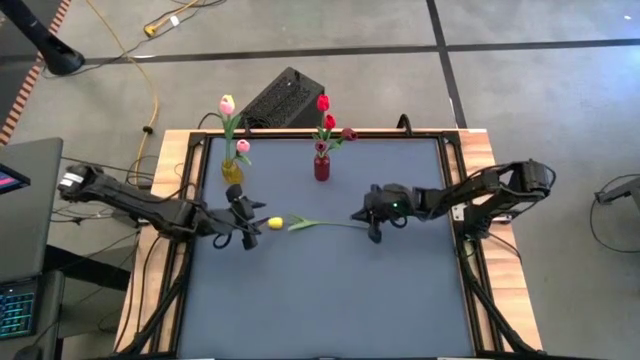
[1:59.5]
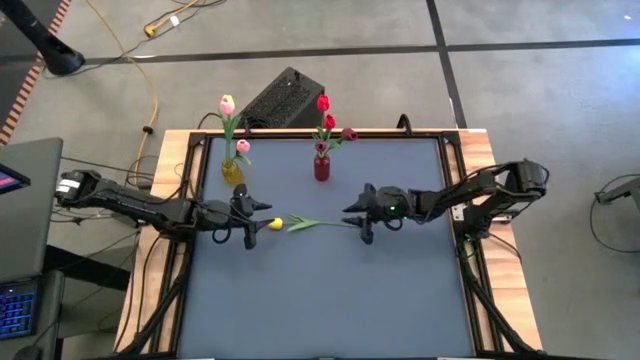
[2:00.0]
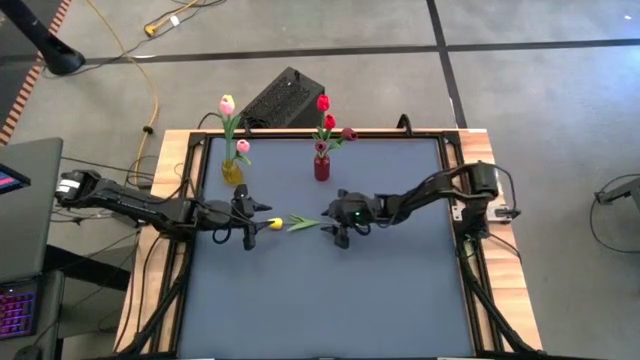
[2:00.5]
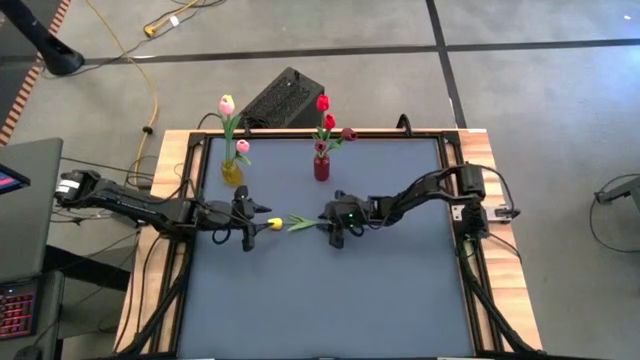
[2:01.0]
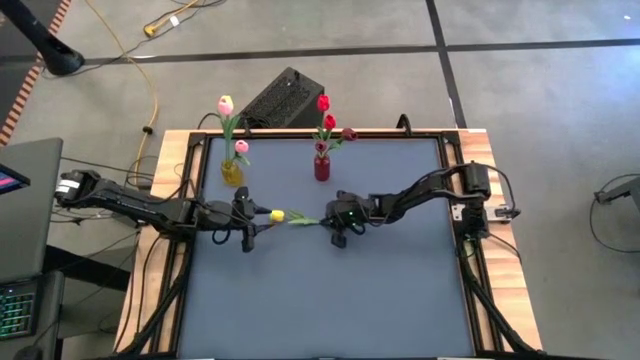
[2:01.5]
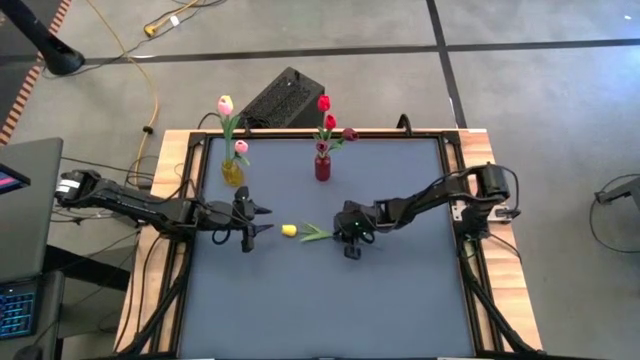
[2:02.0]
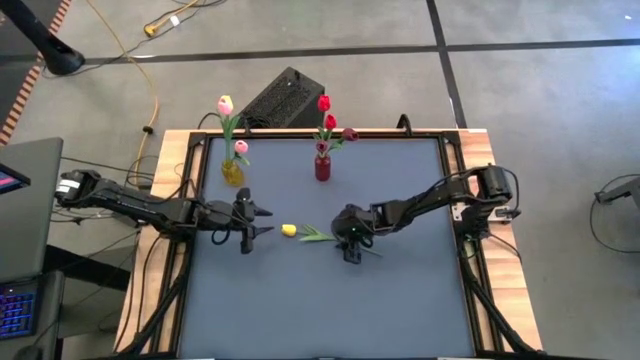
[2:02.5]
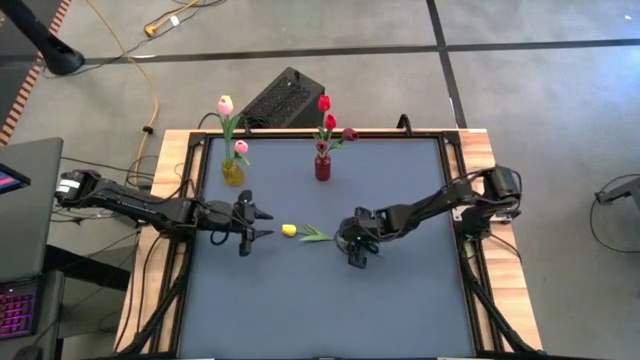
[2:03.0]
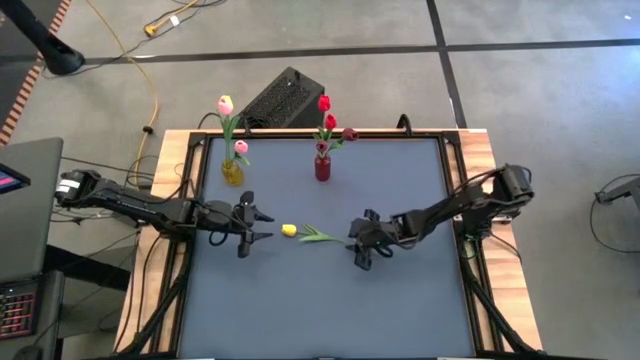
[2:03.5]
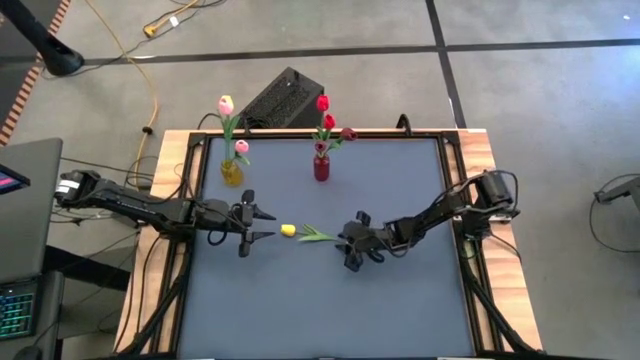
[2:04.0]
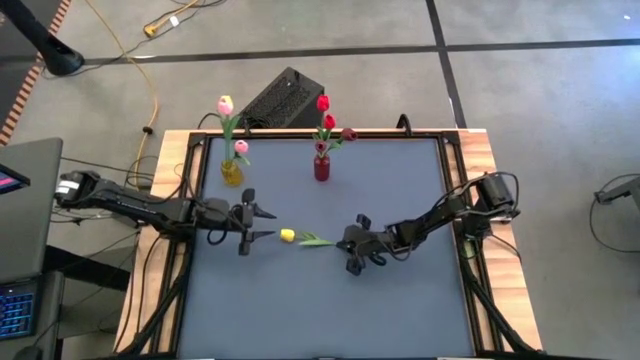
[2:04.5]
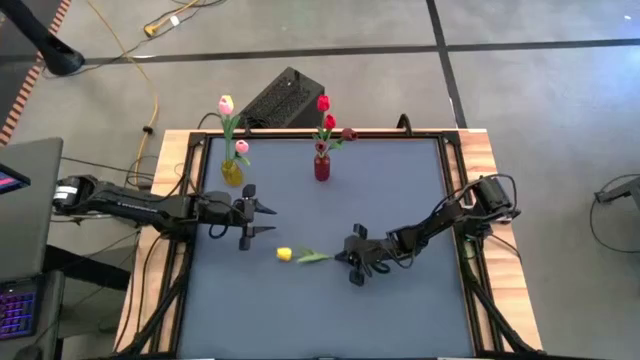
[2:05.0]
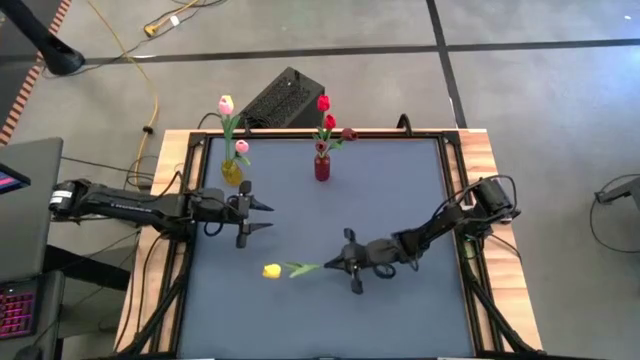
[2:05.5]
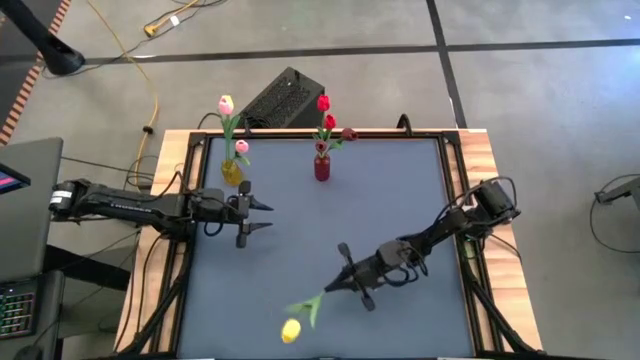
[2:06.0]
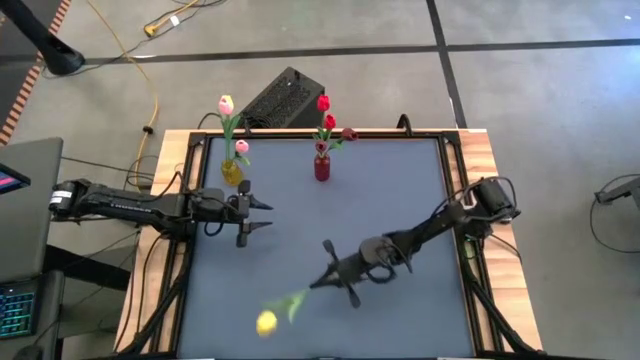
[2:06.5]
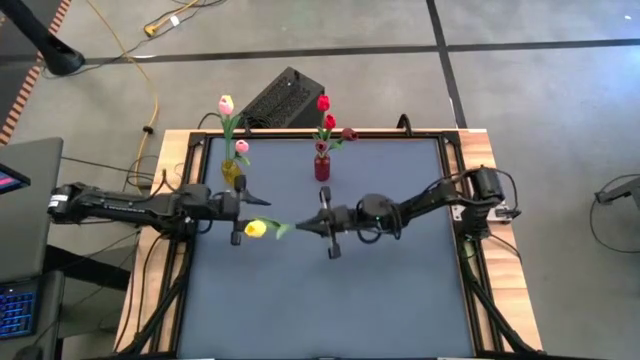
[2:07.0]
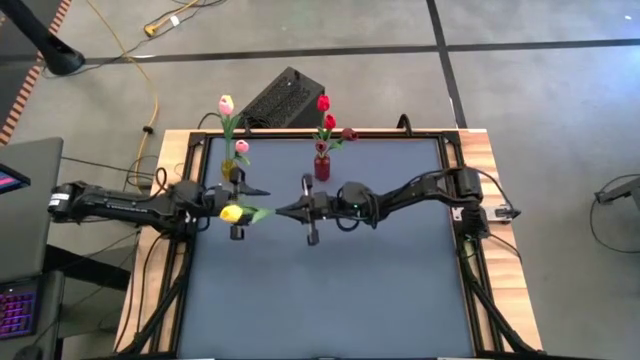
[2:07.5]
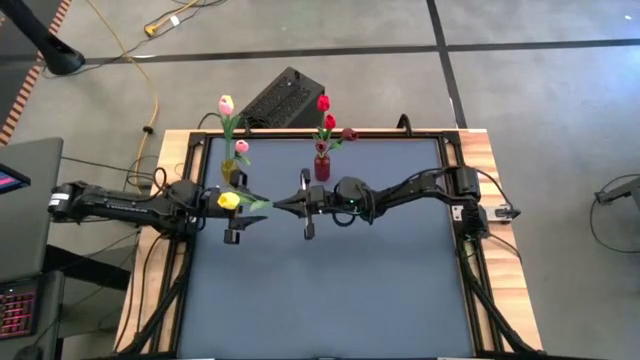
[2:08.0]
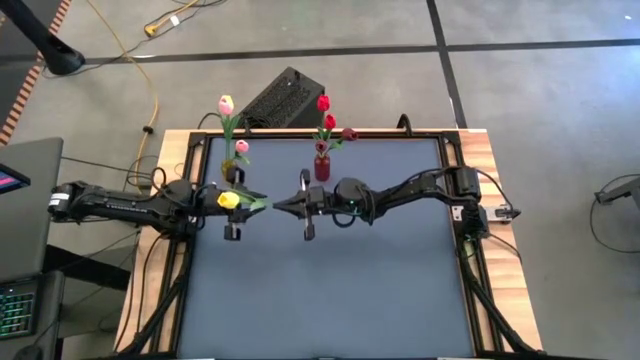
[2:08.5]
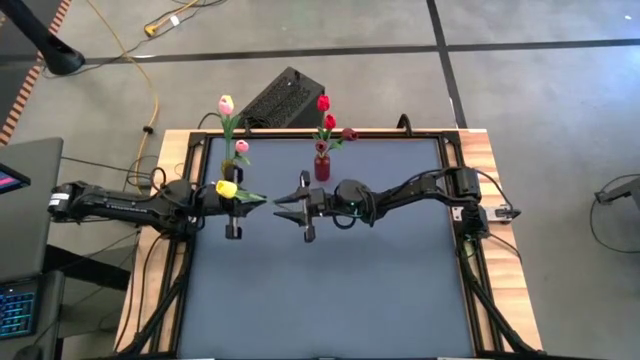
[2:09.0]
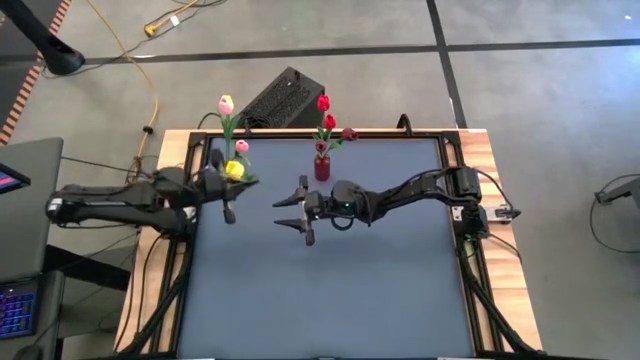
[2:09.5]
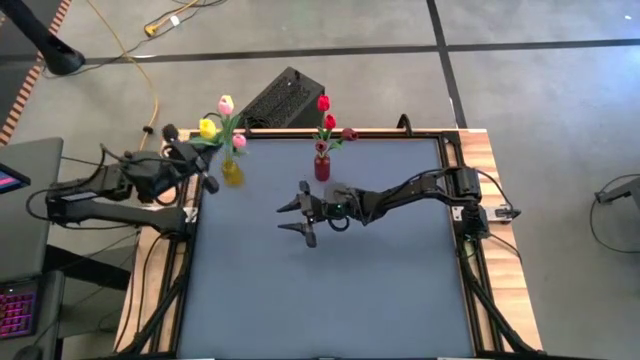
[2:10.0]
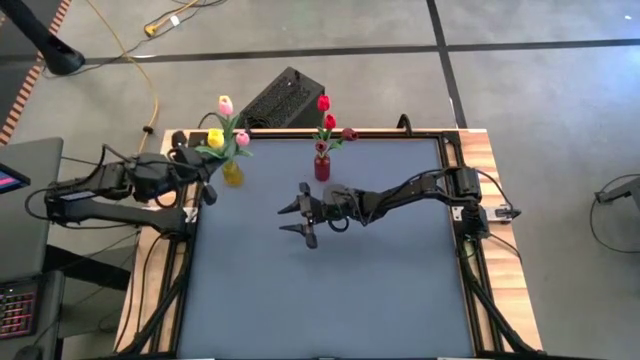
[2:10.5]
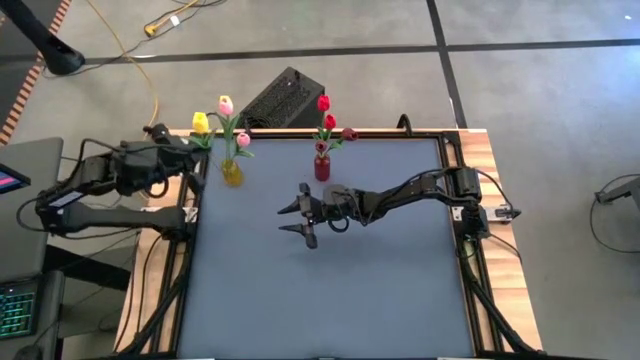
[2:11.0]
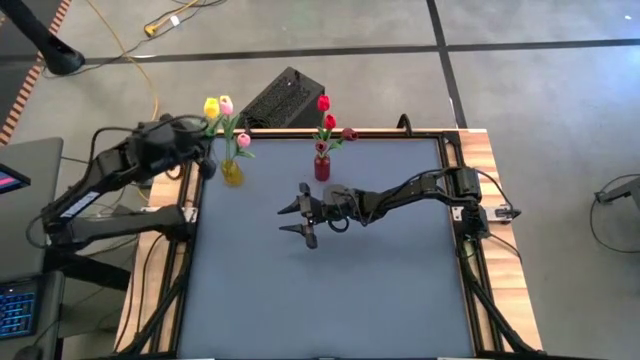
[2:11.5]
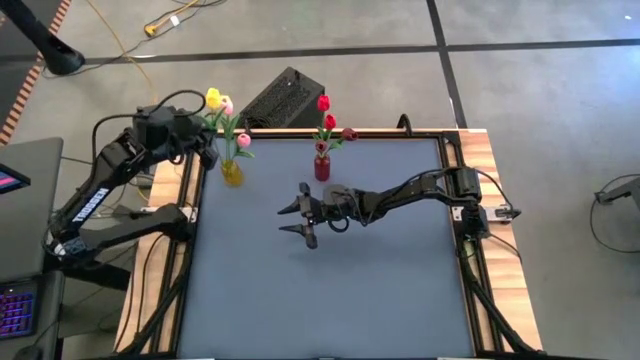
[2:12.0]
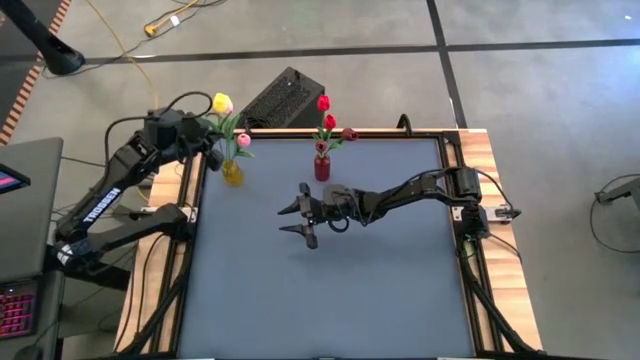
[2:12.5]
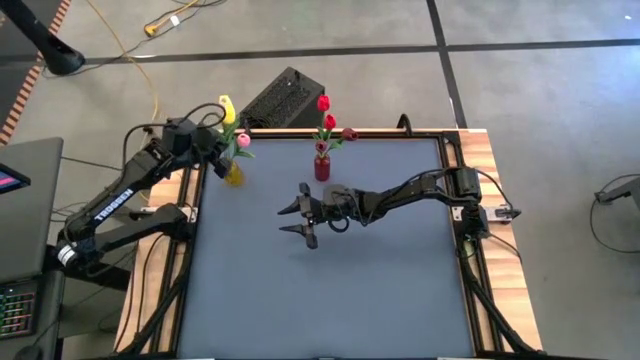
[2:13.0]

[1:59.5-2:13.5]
Task: Sort flowers into vase by color
Put the yellow flower into the yellow flower vase

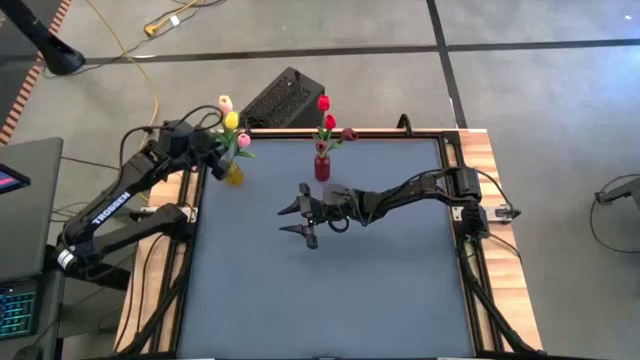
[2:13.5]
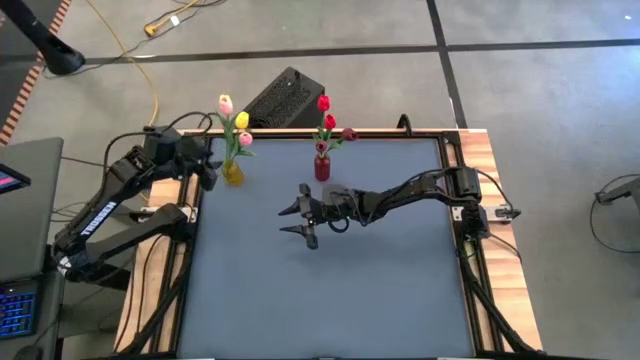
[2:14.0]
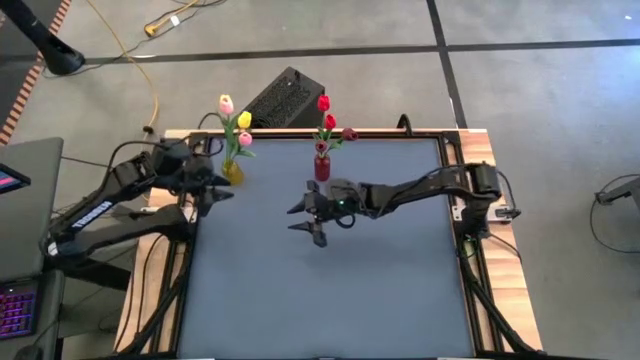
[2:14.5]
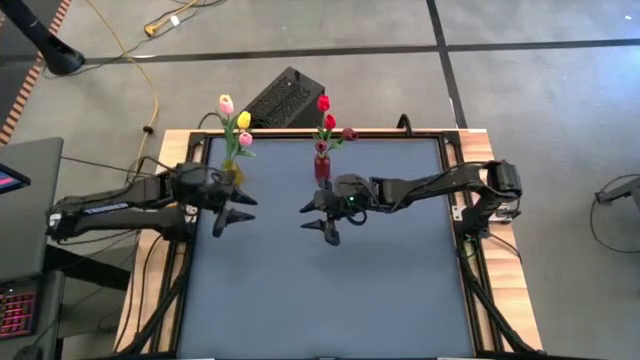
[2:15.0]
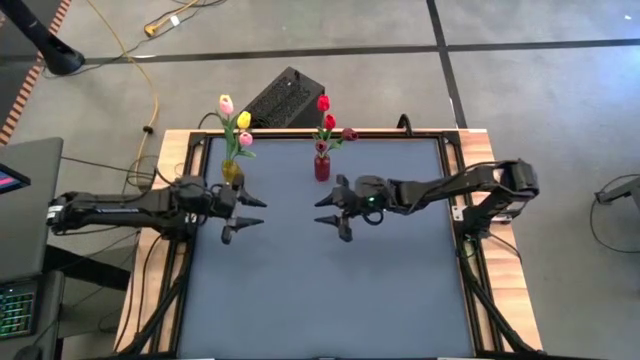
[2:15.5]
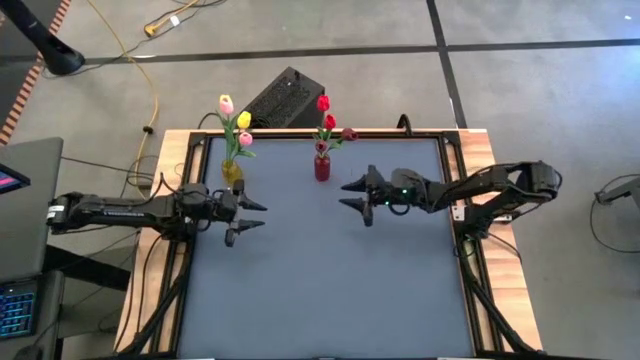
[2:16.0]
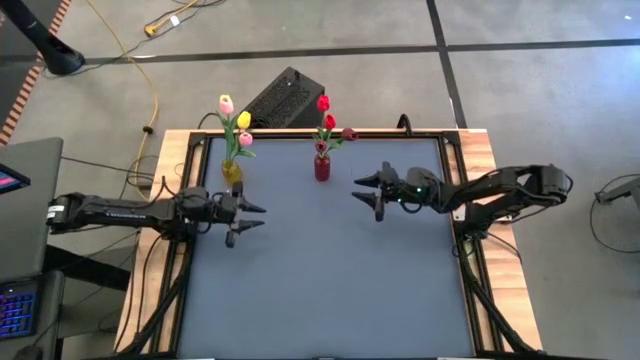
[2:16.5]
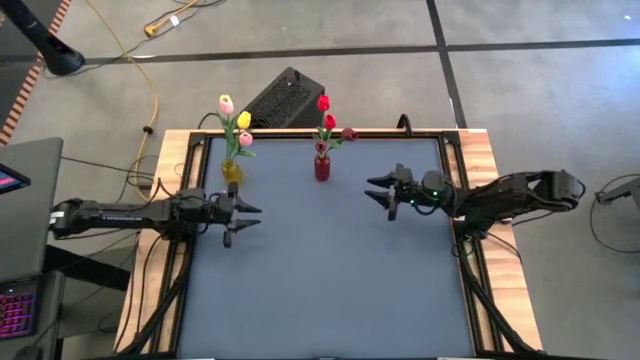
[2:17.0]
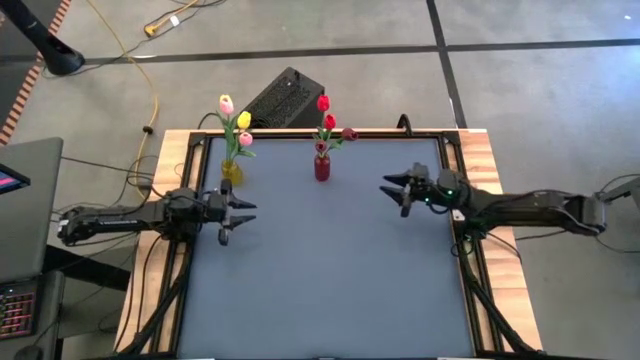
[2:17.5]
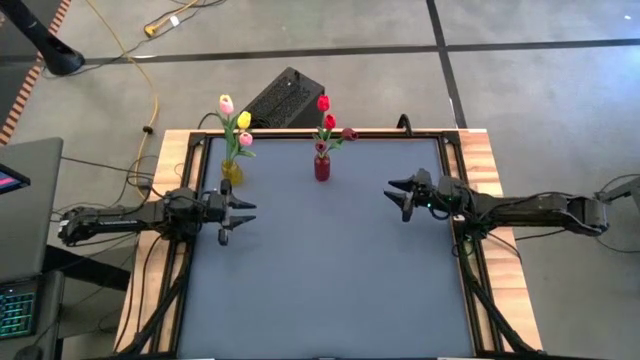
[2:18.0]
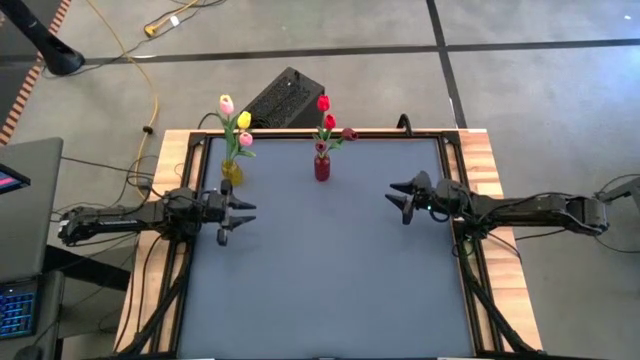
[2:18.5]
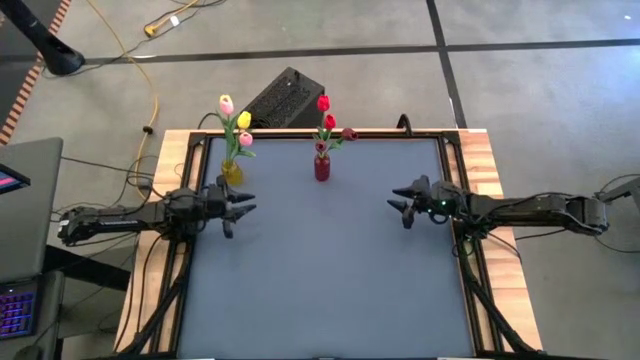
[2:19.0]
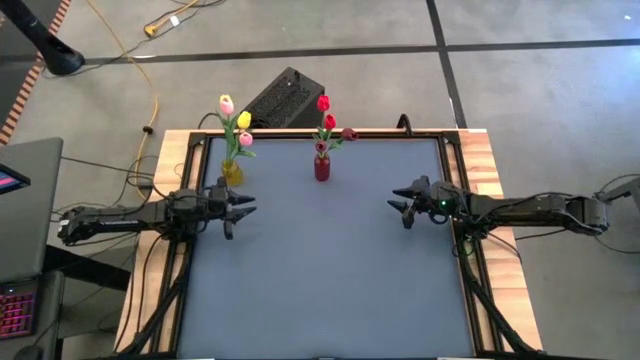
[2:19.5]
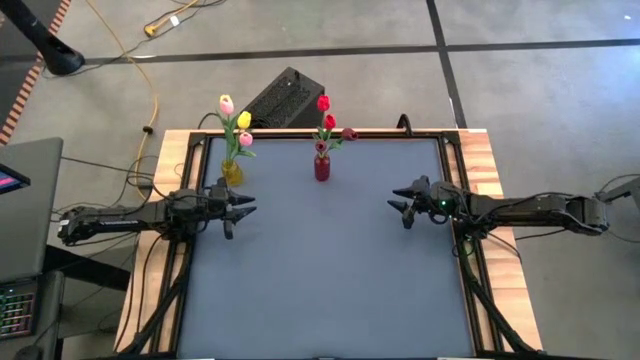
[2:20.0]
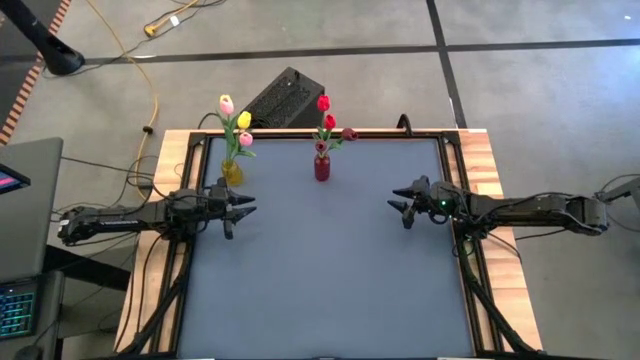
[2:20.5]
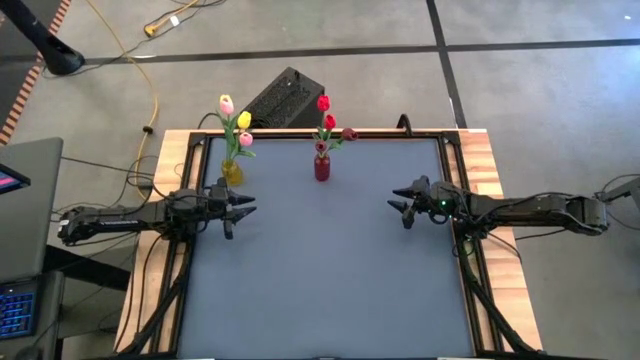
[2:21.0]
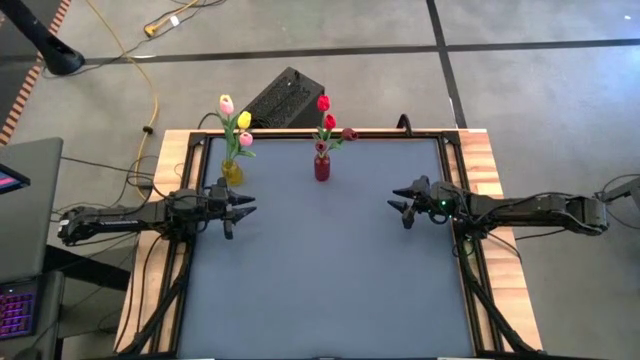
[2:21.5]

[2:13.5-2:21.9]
Return to Home Position
